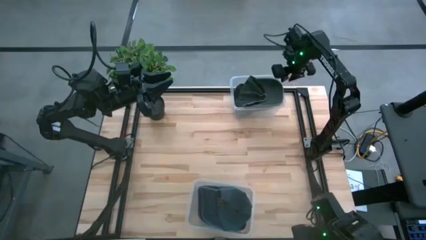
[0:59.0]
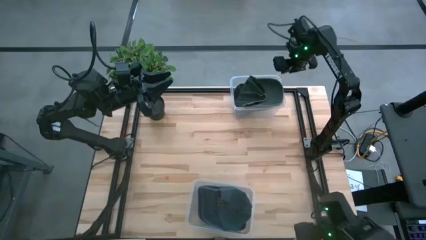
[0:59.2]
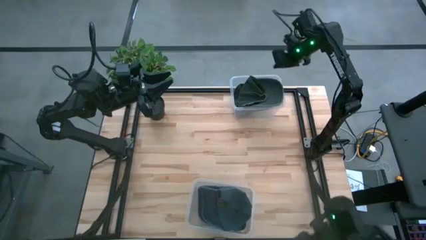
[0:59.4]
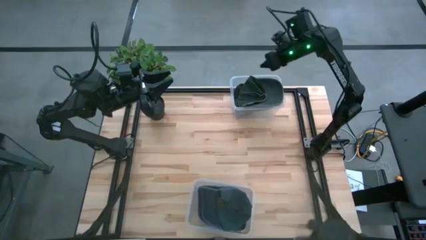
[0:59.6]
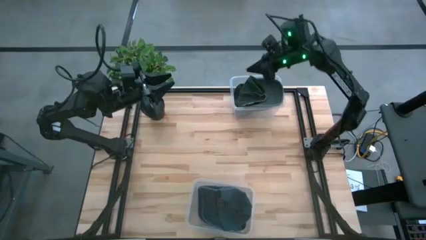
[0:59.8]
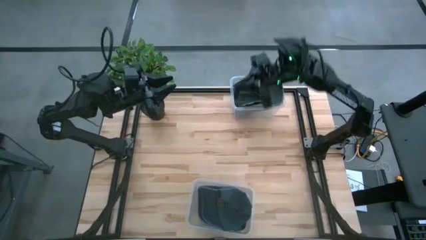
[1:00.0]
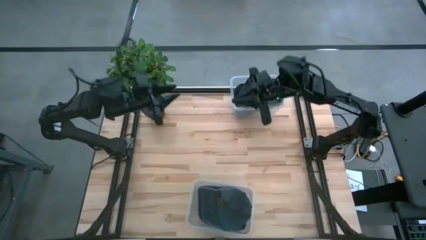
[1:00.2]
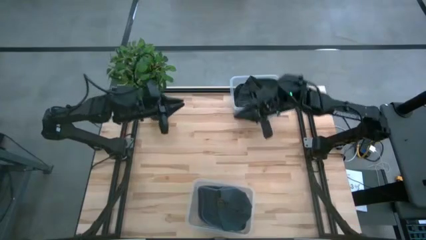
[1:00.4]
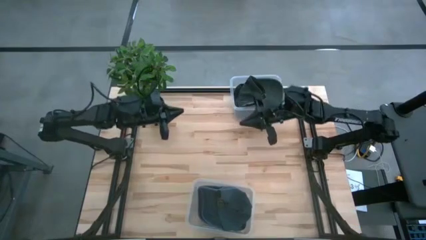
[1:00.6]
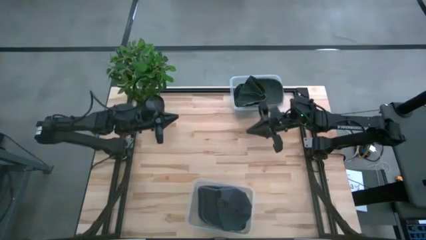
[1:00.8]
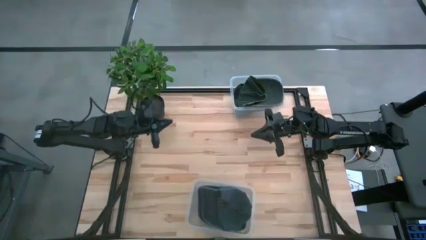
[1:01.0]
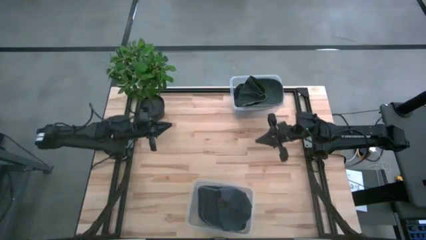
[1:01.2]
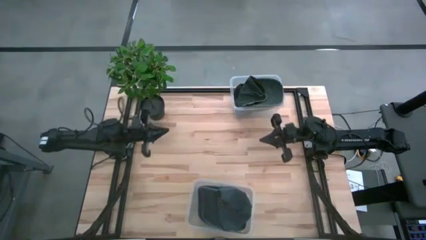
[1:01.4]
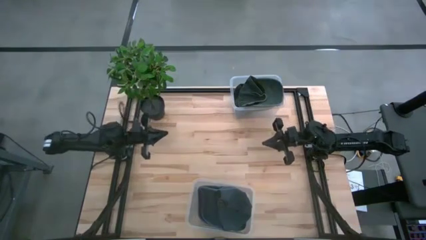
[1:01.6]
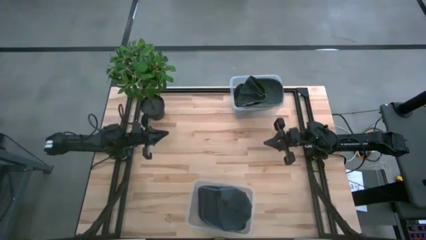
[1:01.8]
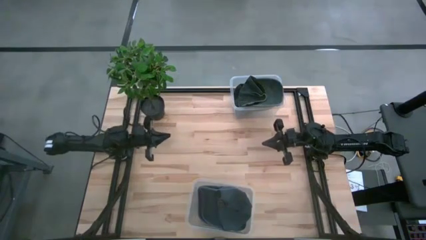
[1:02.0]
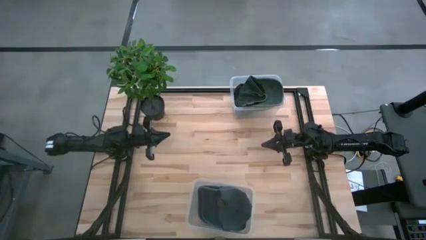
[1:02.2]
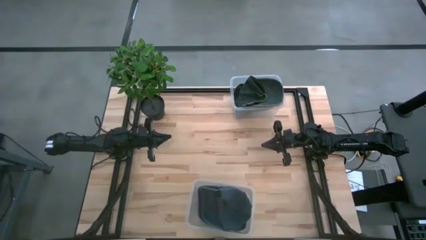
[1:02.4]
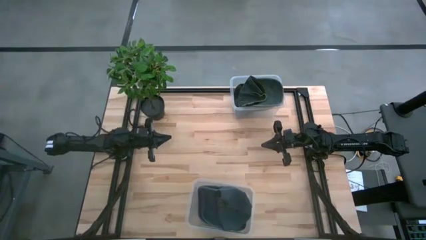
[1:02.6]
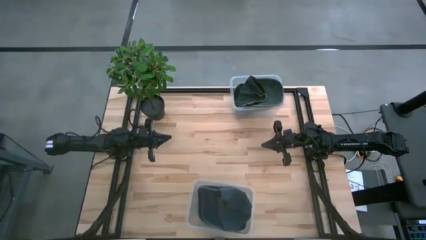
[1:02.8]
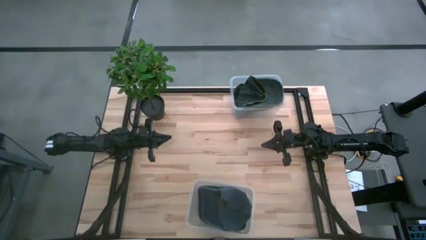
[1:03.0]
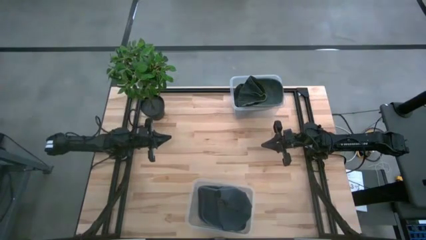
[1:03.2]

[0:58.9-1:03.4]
Task: Pick & Place hat
Return to Home Position

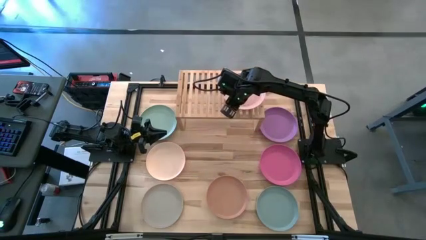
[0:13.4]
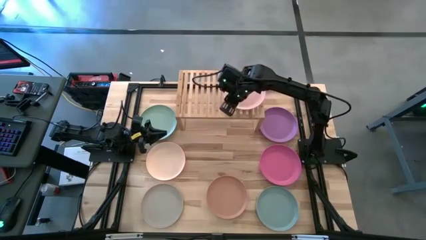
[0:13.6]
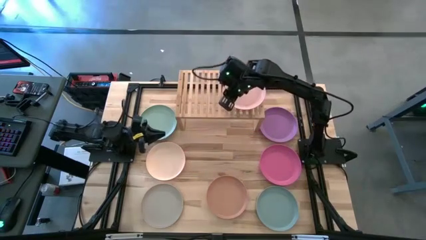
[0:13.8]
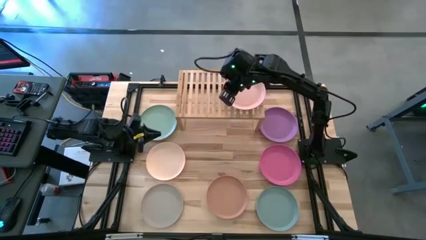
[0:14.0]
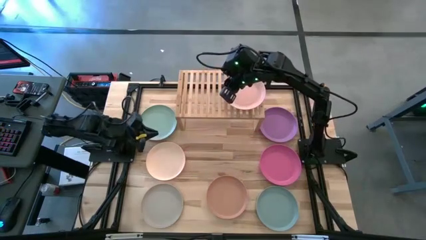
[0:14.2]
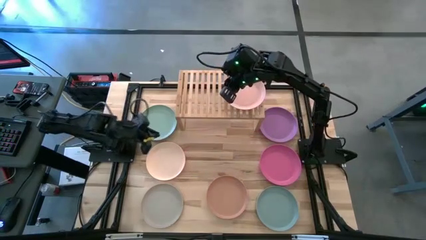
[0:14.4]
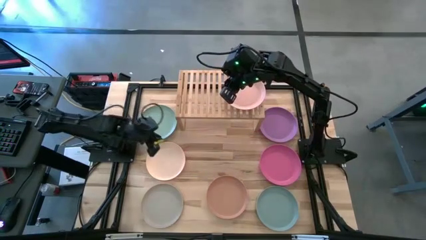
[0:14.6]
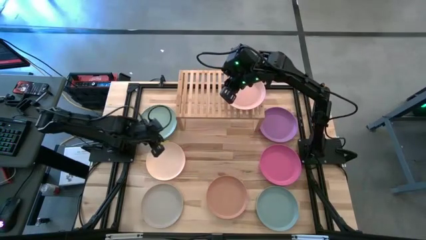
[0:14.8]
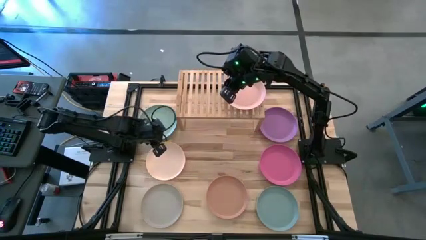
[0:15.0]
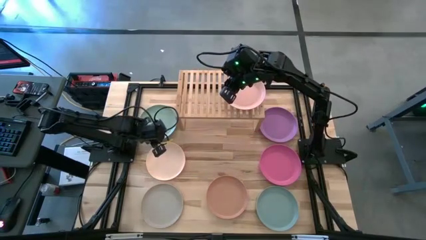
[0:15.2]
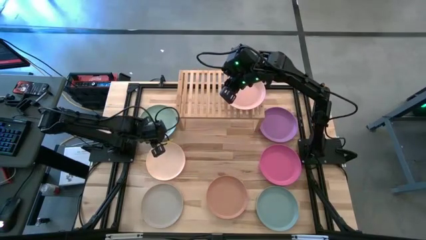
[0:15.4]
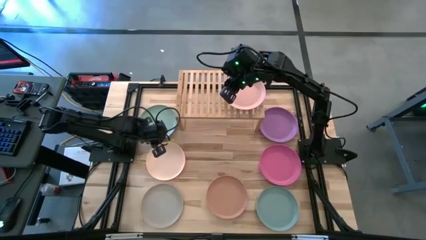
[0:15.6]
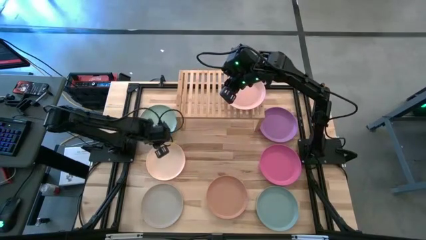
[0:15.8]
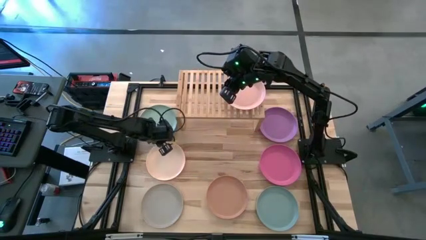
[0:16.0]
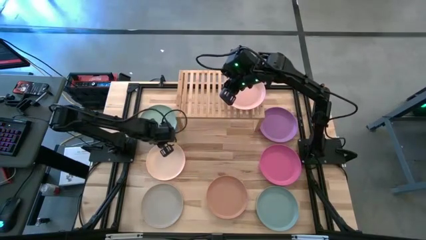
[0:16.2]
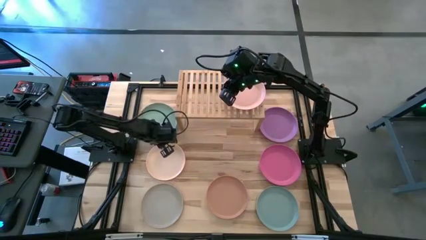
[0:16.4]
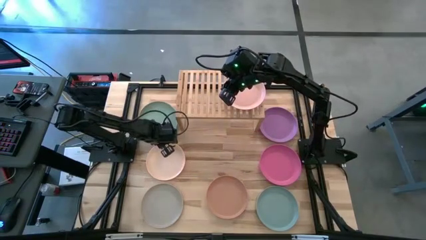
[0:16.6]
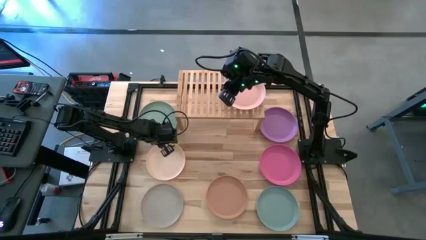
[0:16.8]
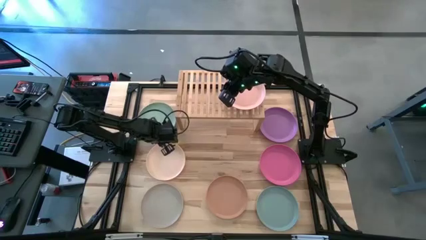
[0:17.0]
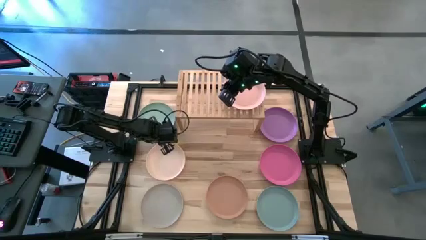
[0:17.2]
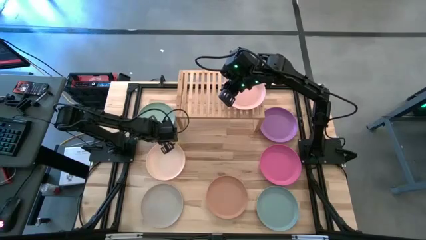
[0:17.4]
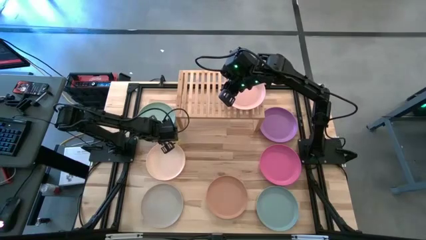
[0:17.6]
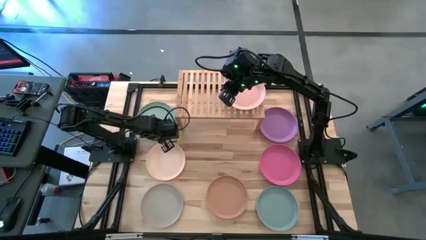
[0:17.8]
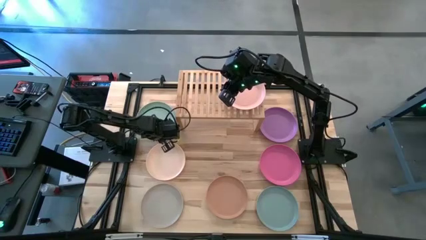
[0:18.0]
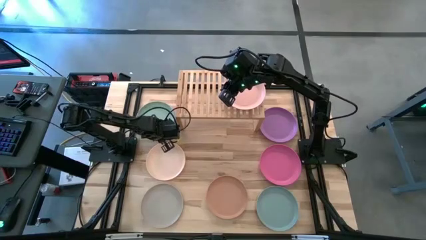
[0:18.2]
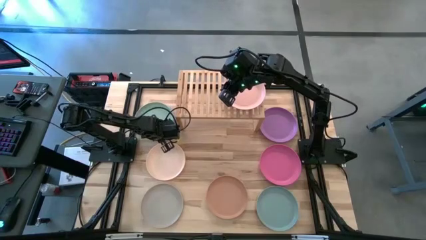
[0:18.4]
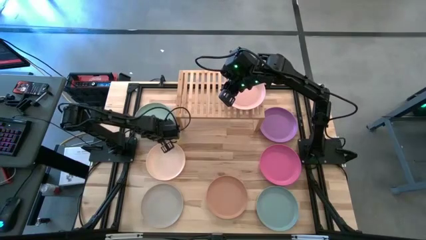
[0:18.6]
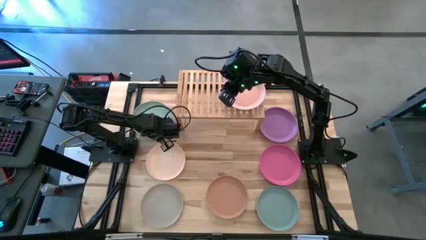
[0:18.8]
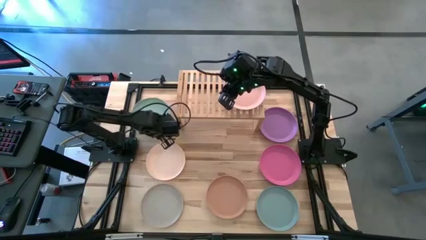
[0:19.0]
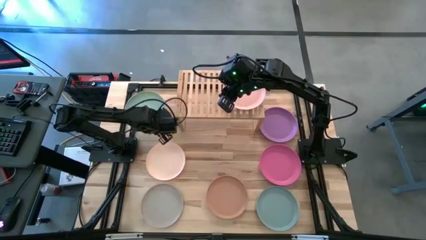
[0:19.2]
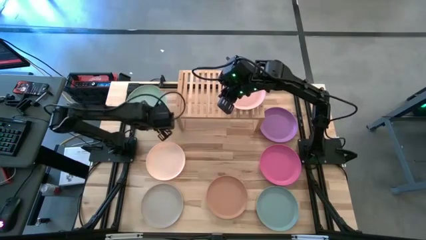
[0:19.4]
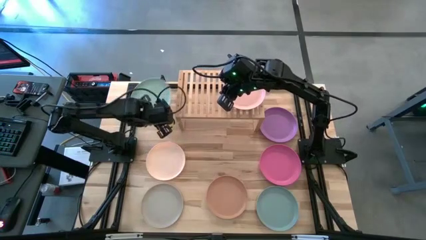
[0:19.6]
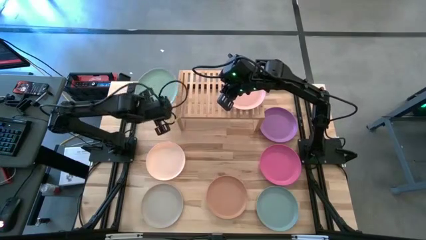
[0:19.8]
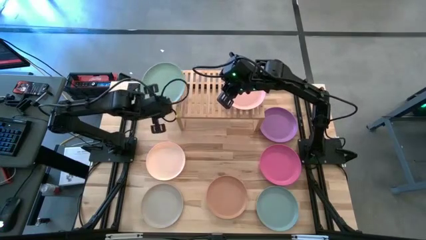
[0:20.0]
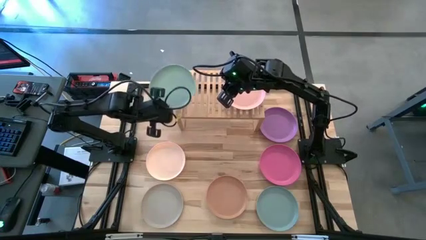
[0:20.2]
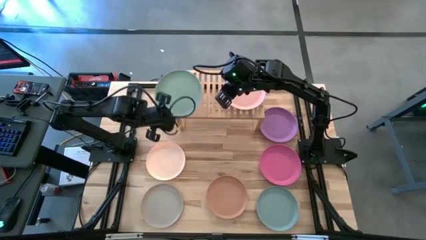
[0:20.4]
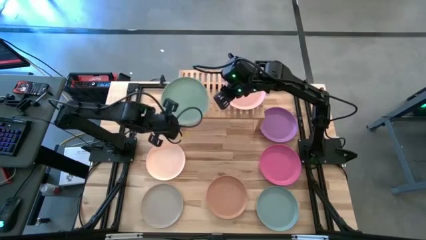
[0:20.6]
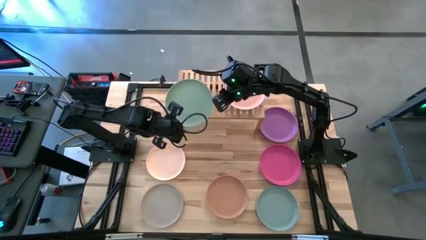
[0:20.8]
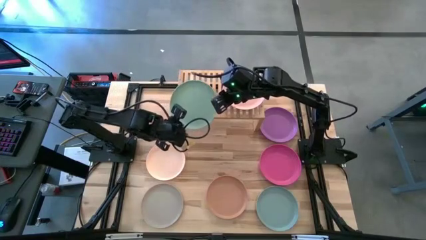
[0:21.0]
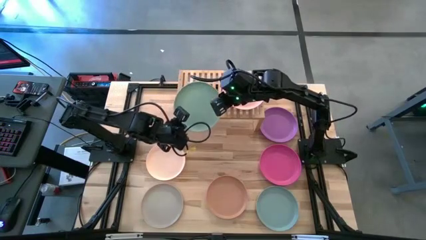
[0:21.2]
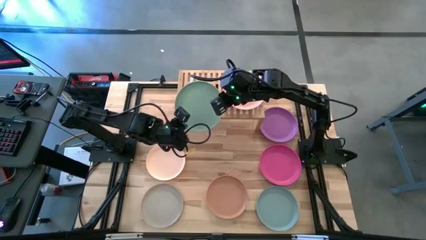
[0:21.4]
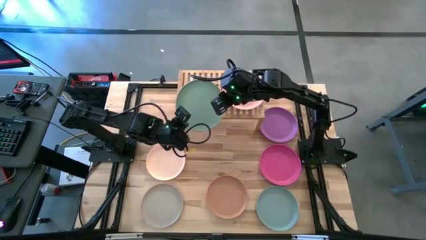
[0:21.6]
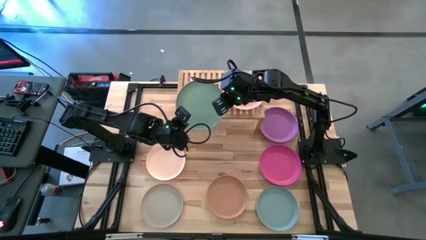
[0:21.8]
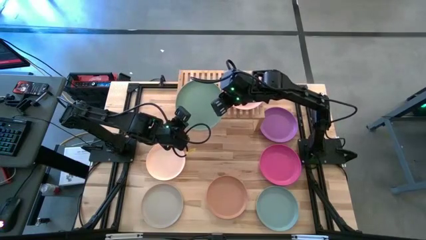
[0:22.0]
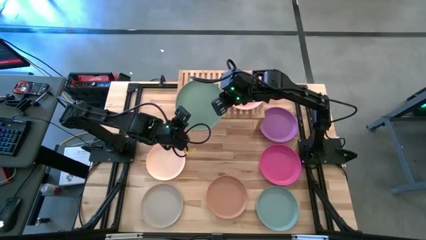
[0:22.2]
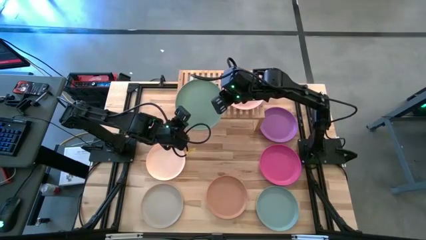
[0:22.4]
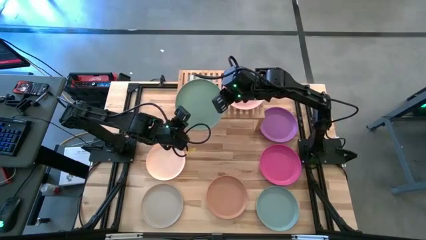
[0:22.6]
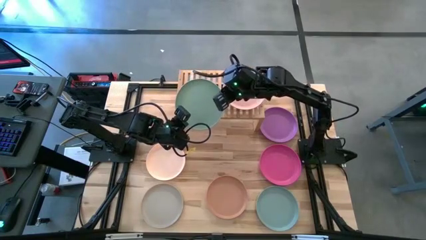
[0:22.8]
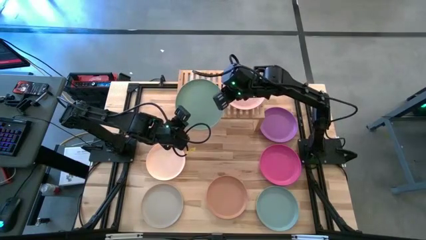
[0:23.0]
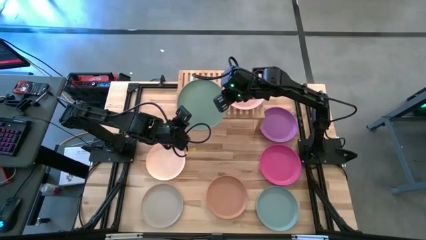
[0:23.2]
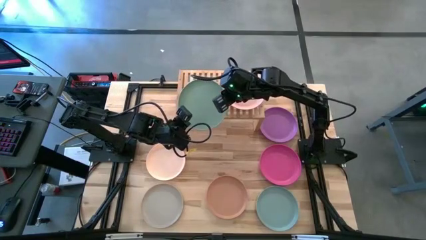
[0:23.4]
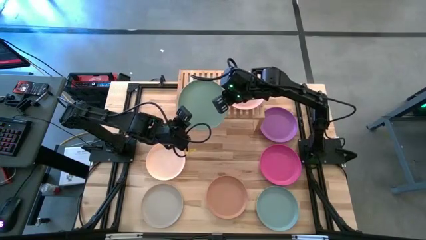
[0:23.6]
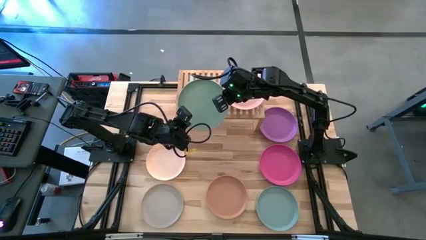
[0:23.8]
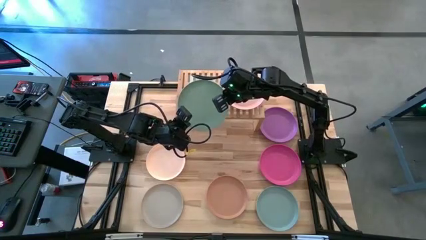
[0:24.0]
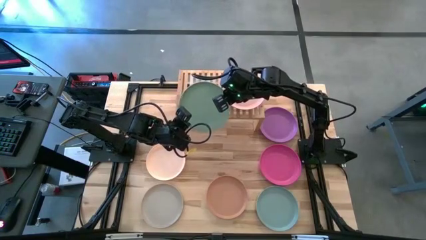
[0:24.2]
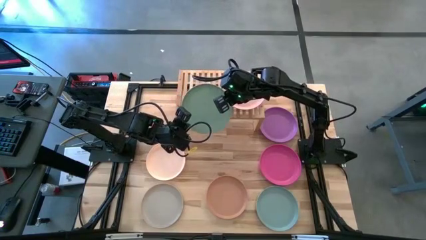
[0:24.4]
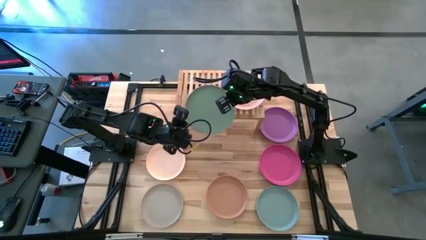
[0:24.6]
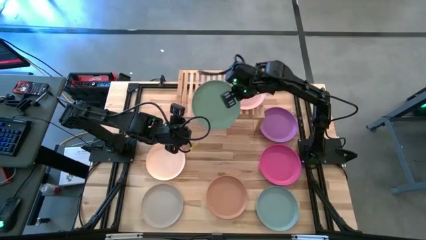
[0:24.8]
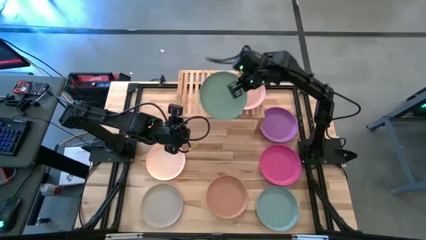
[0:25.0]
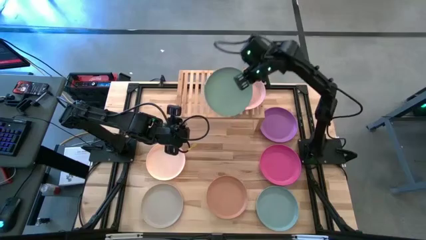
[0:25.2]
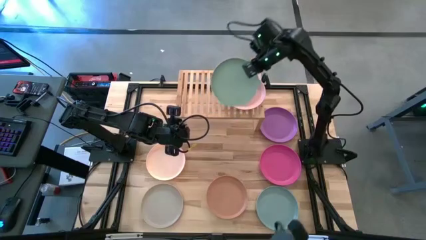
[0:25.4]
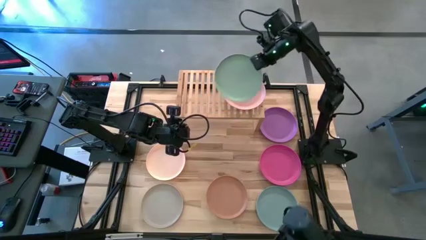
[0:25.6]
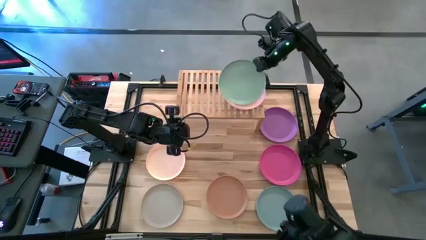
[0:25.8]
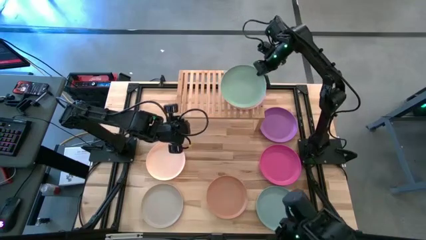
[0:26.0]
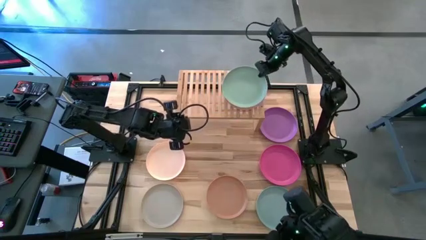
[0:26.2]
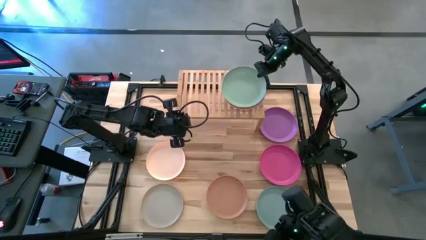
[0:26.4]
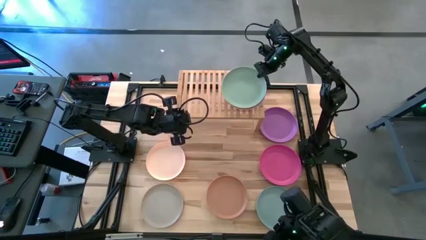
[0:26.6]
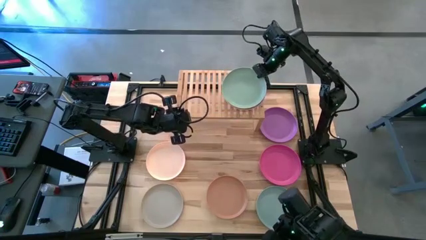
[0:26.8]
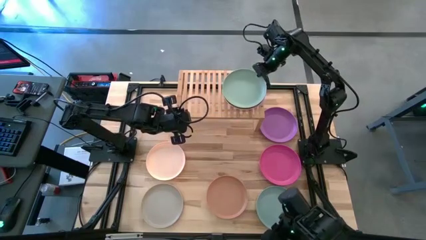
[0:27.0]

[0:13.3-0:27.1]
Task: Place and stack plates onto a shelf
Stack the light green plate on the light pink plate on the shelf
